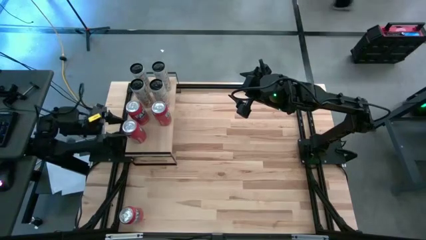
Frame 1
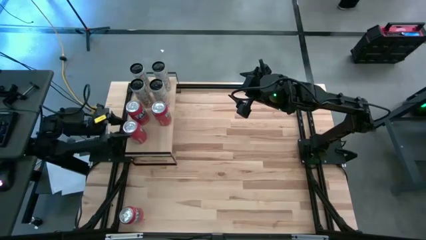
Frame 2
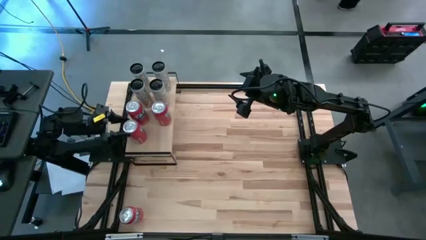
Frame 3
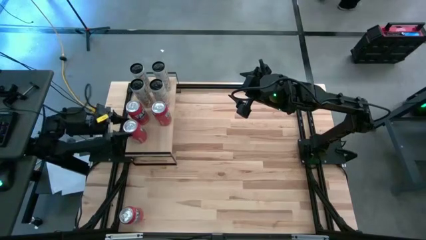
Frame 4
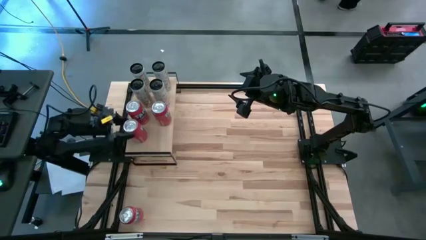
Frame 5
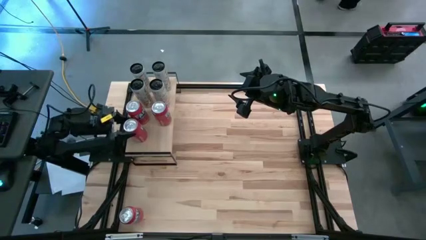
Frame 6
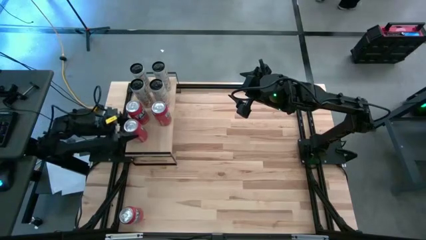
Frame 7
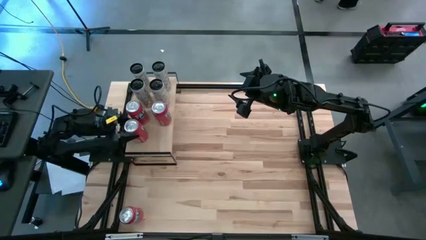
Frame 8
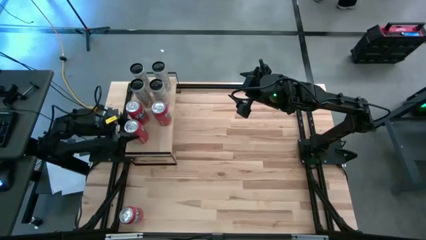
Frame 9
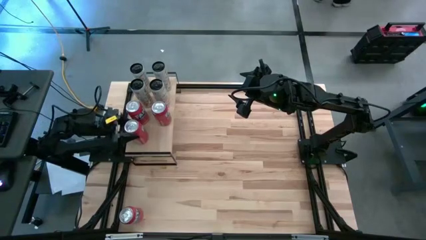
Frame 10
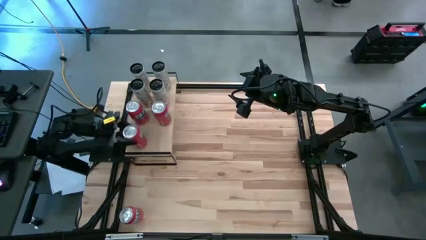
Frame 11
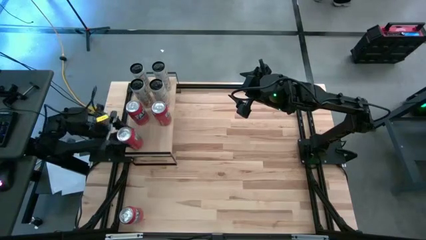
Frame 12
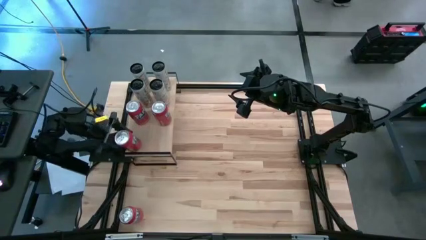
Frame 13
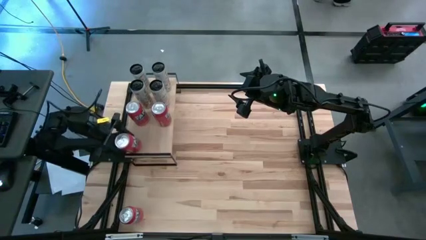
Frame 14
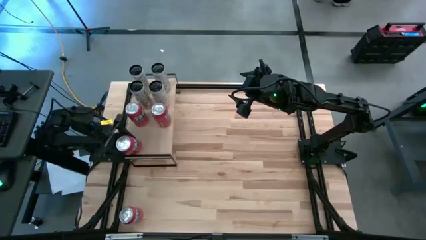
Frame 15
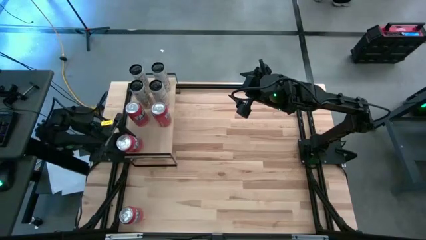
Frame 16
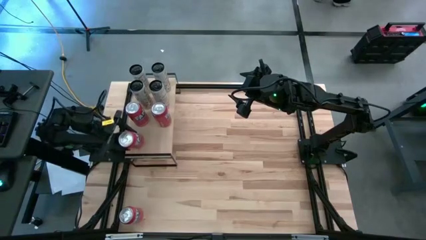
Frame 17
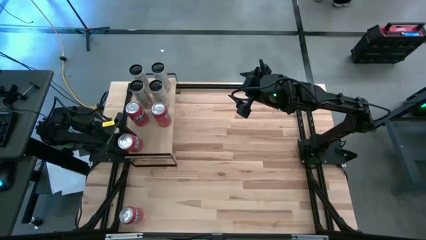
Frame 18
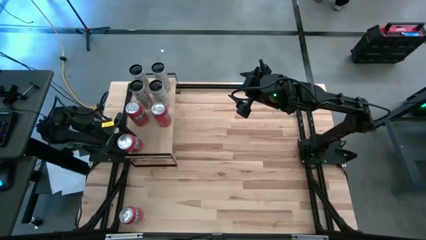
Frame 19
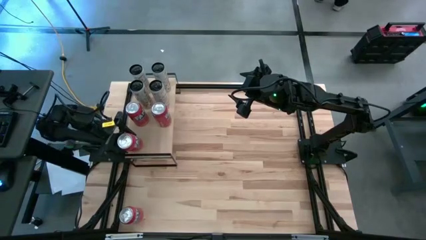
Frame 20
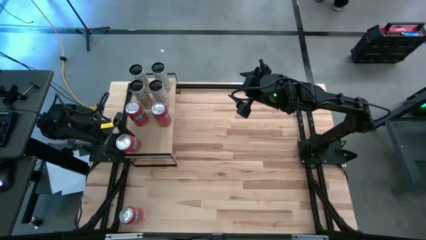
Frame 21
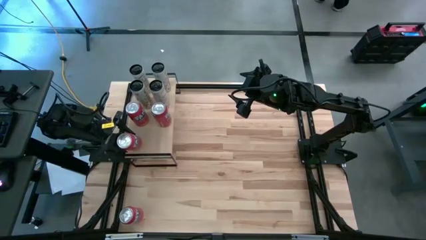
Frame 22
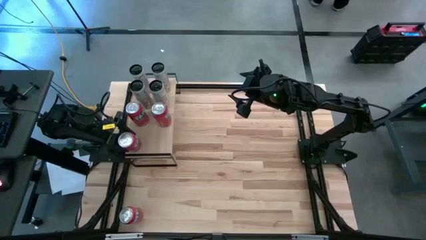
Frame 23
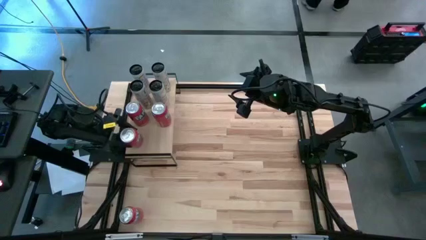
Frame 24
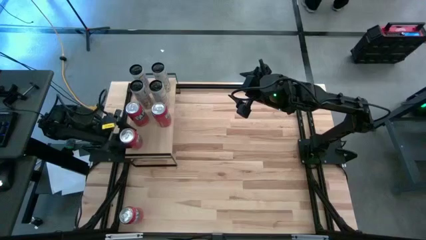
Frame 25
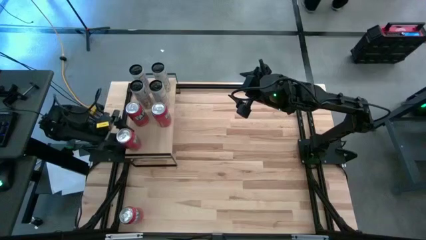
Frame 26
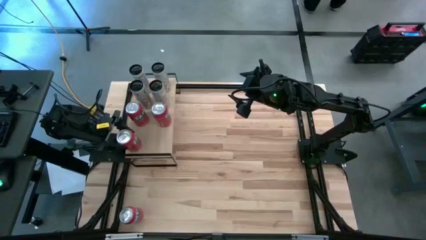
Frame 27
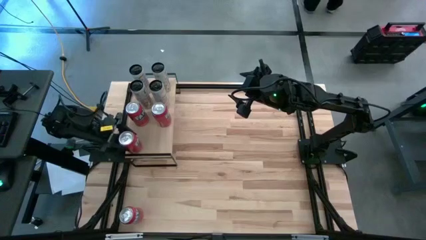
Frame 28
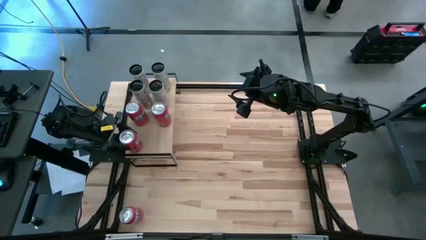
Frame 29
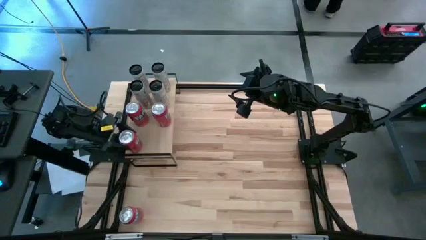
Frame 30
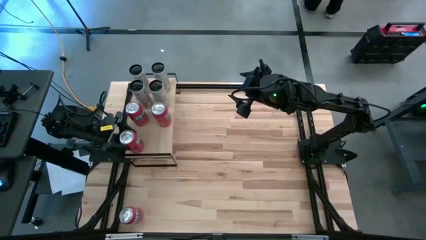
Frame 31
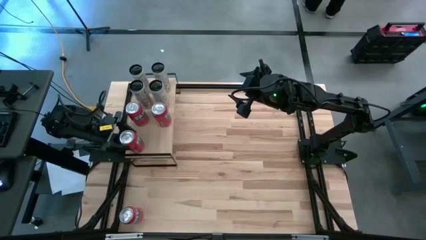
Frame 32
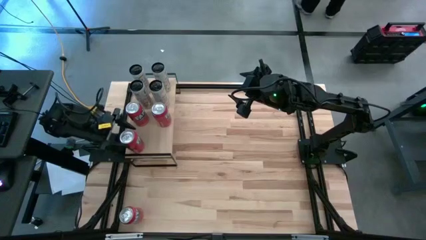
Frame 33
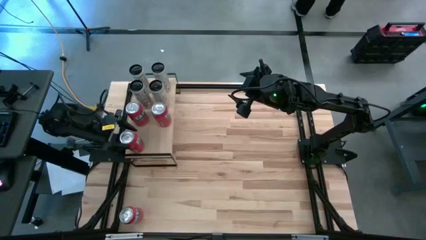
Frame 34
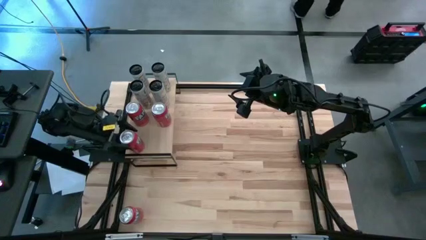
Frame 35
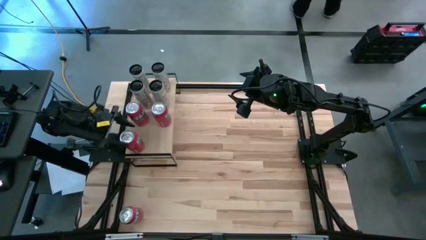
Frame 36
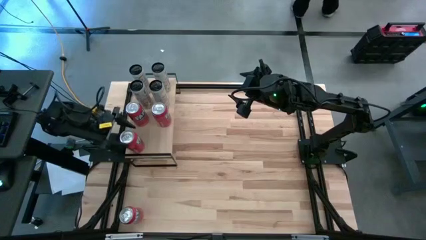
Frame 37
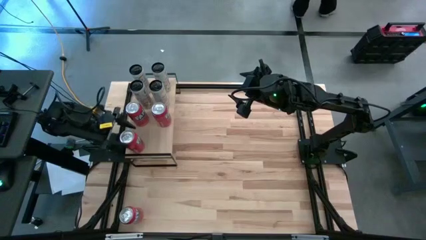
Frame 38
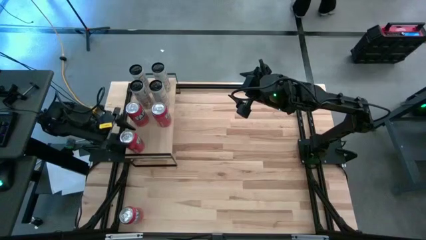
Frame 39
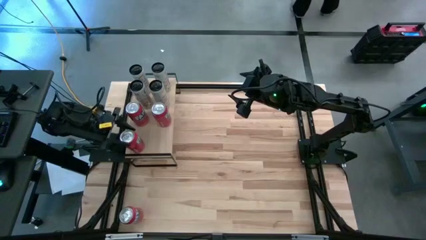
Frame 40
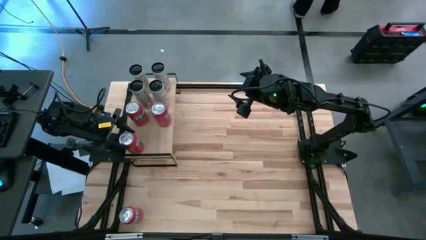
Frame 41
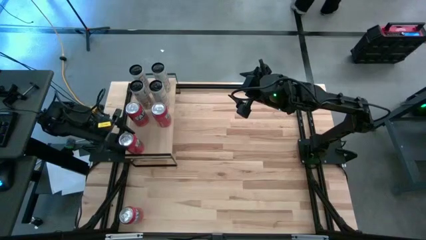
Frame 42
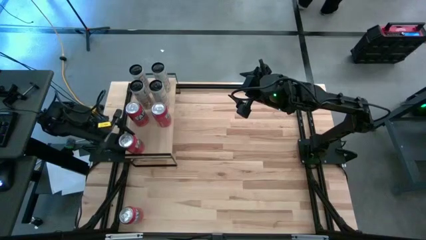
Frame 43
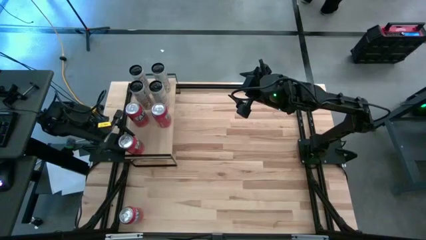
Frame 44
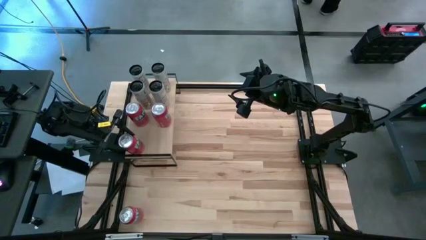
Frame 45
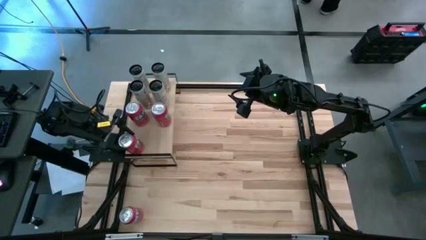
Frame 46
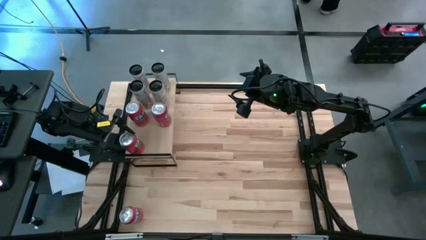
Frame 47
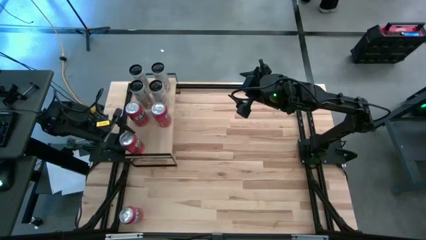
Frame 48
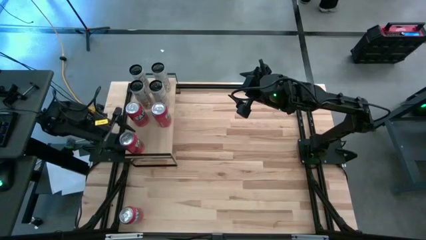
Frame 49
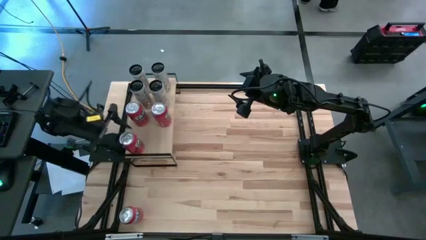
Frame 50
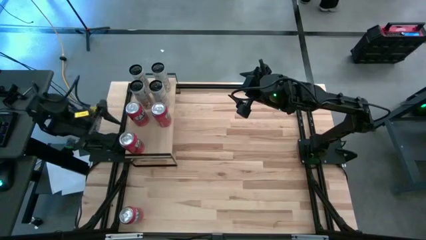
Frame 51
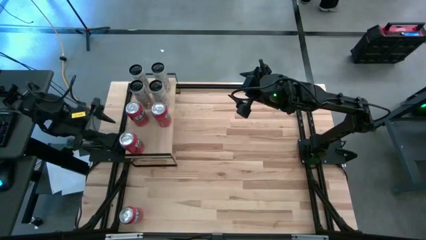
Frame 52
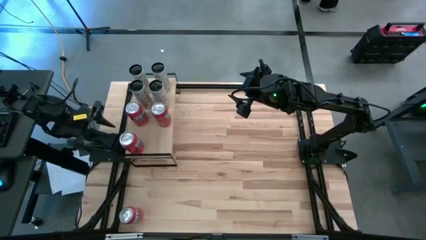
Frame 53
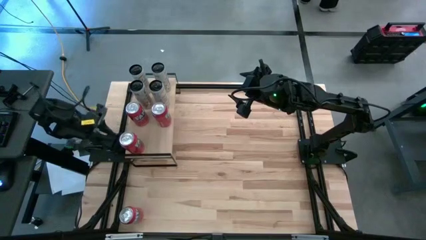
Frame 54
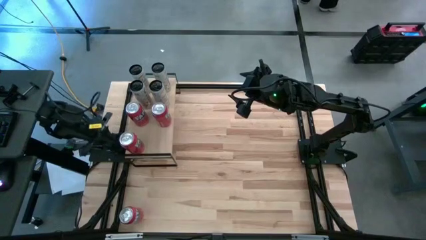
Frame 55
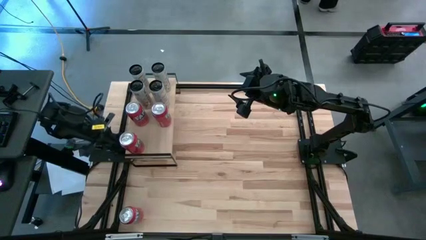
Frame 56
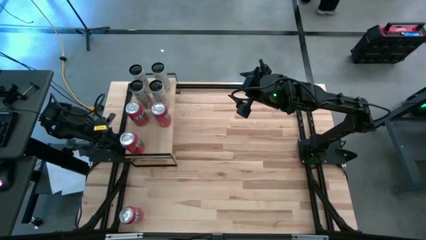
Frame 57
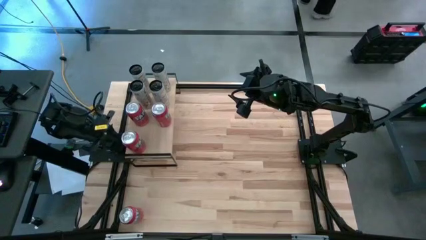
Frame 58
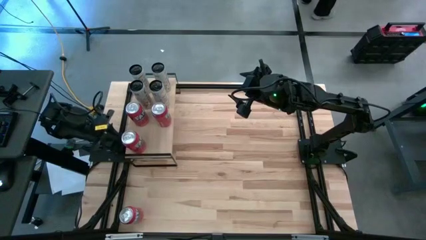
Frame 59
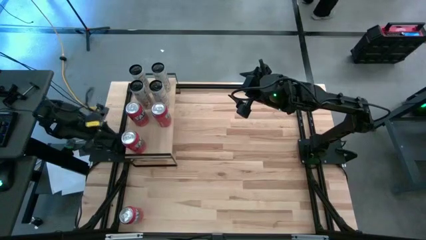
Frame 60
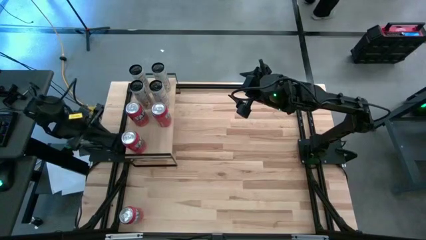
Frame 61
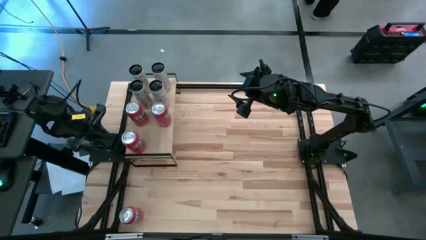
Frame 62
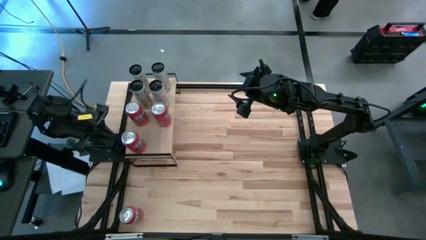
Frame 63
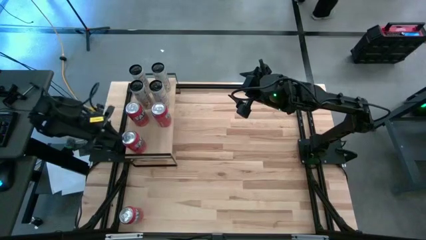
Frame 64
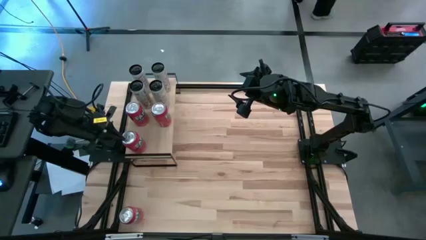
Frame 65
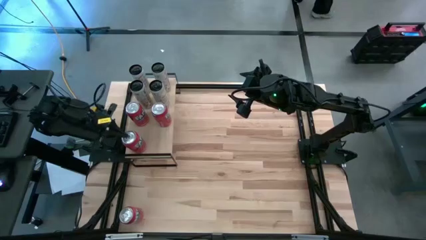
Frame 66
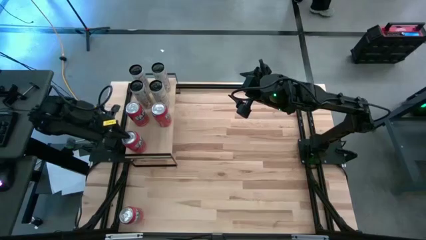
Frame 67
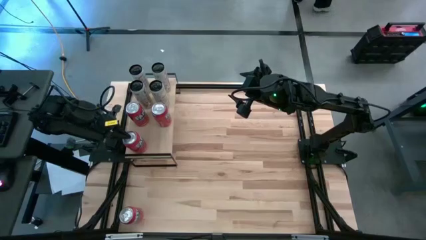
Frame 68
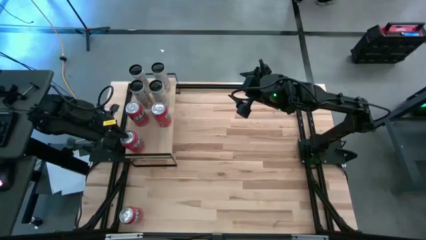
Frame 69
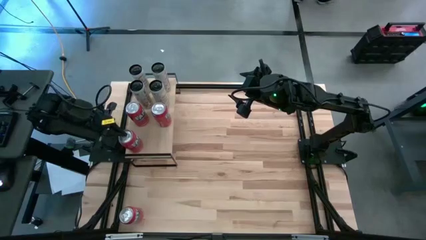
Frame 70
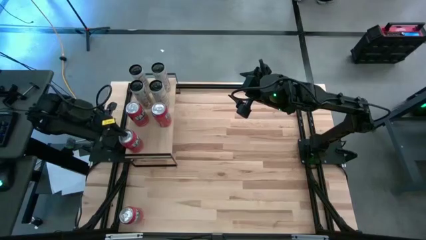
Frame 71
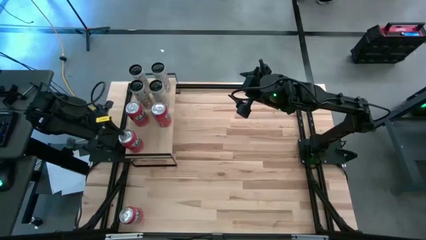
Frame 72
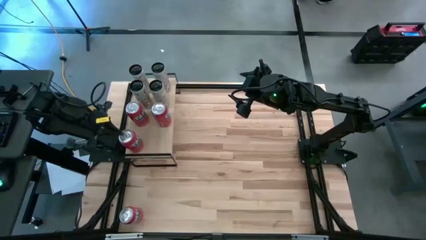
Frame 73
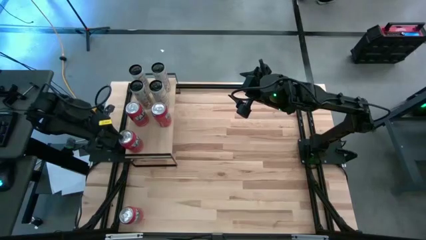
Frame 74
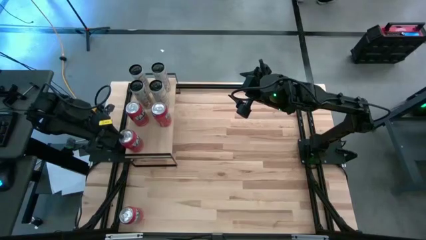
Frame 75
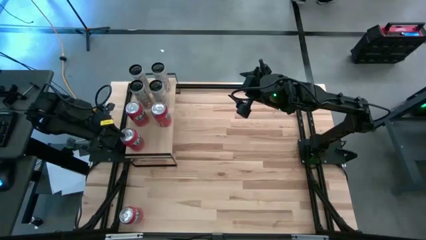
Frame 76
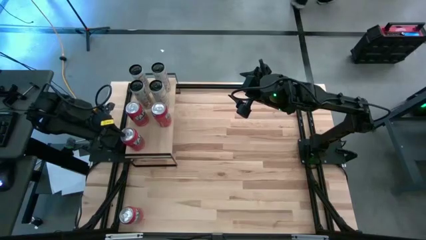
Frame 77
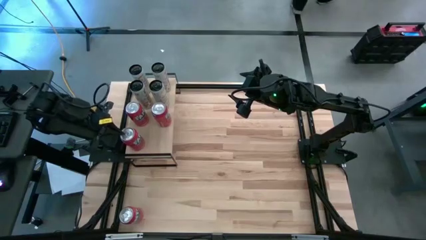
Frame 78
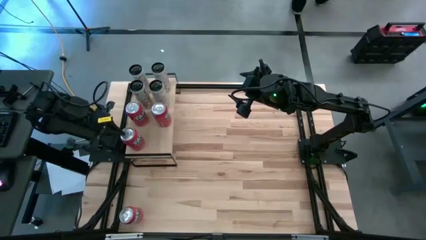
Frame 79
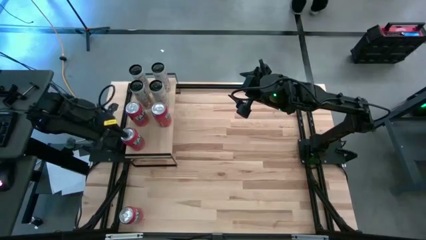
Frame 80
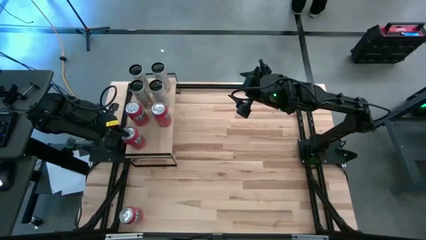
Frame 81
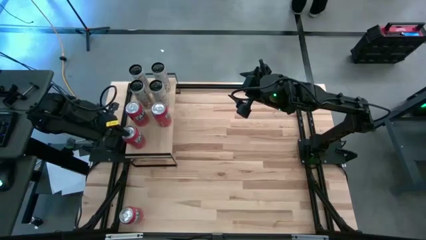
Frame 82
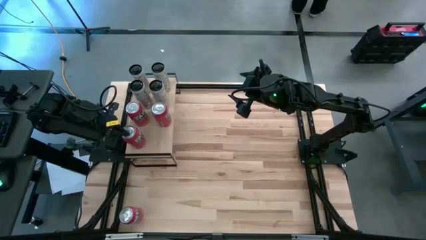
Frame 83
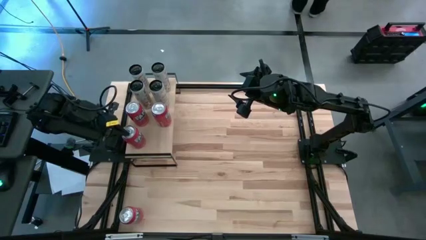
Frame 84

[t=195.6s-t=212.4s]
Task: Place canned beverage on shelf
Put the top red soda can on the shelf
